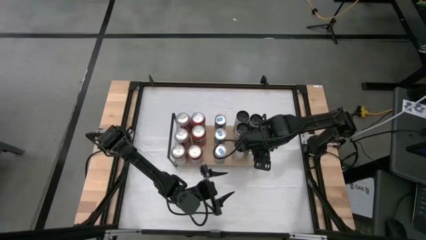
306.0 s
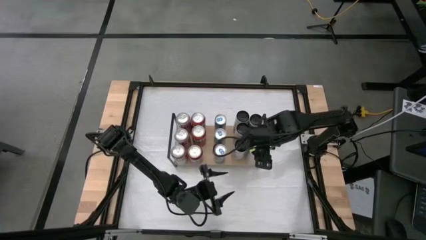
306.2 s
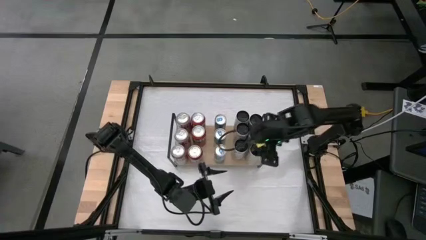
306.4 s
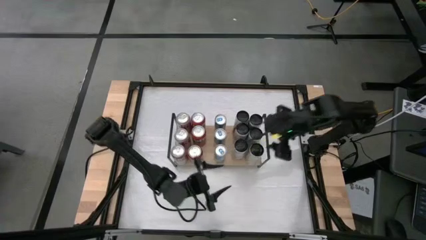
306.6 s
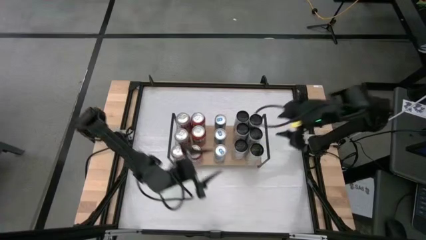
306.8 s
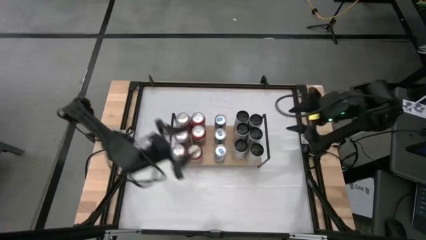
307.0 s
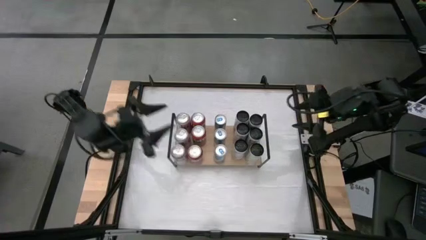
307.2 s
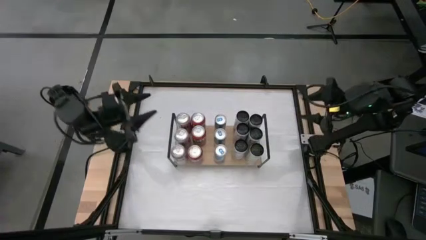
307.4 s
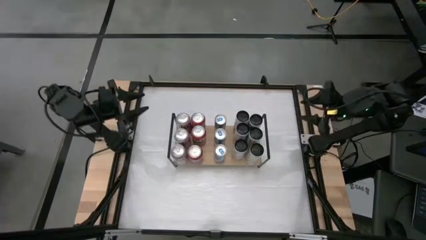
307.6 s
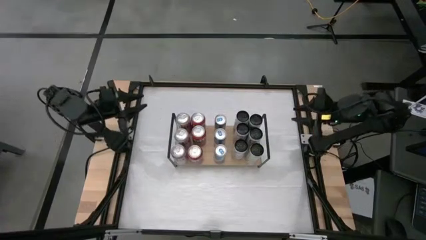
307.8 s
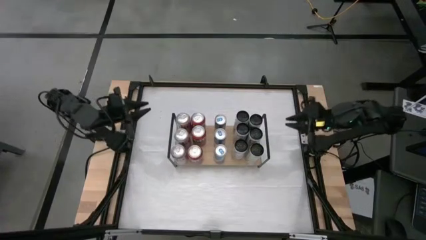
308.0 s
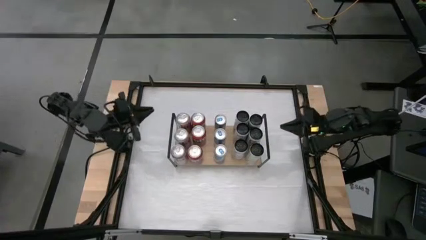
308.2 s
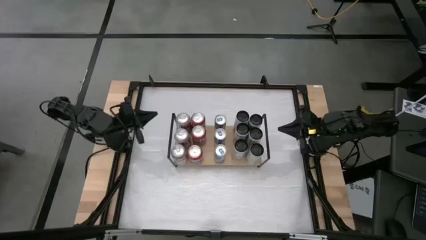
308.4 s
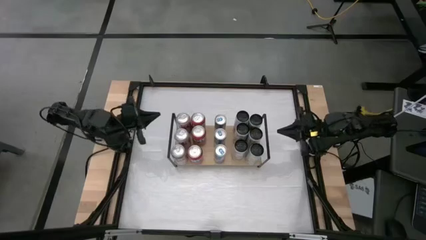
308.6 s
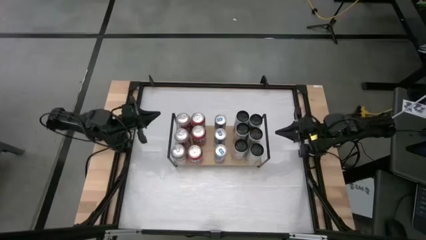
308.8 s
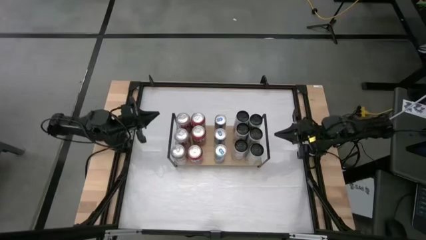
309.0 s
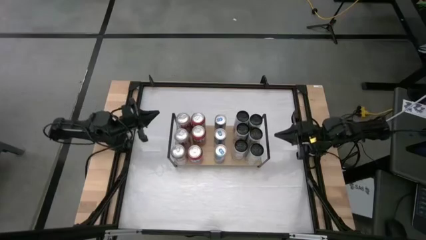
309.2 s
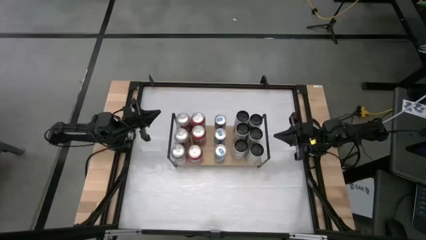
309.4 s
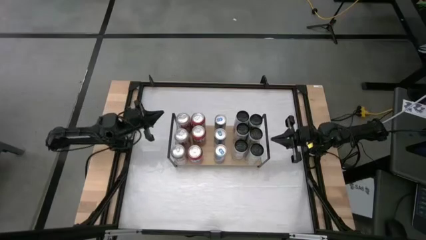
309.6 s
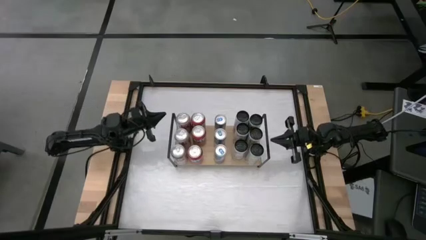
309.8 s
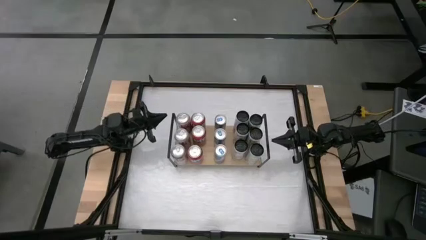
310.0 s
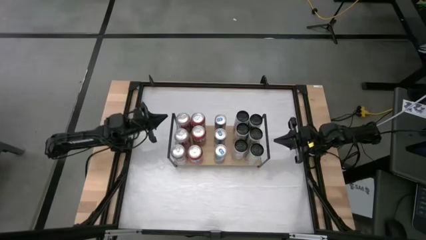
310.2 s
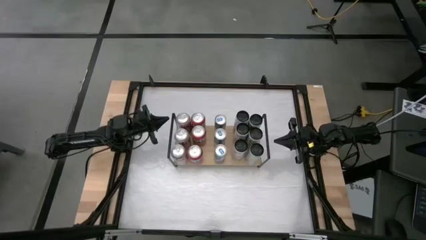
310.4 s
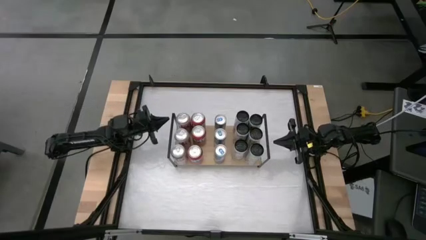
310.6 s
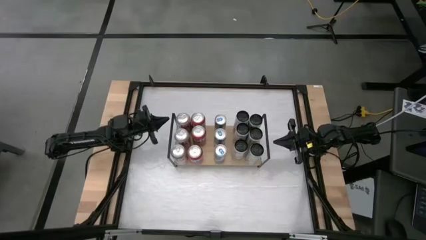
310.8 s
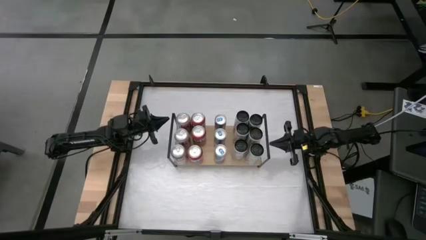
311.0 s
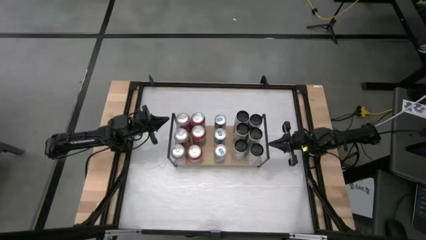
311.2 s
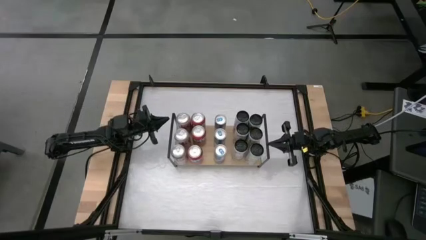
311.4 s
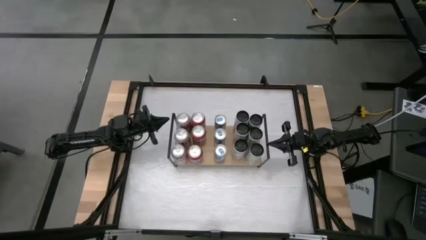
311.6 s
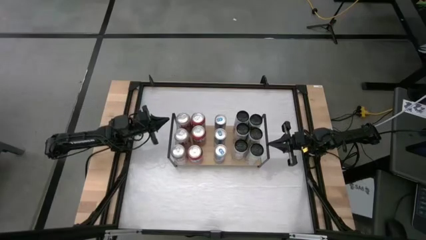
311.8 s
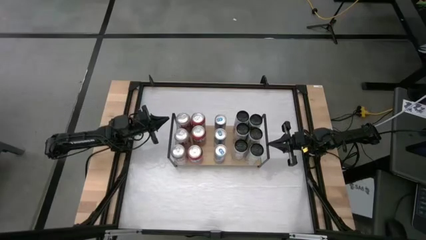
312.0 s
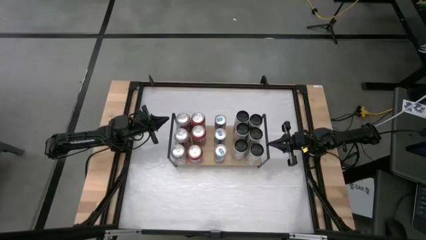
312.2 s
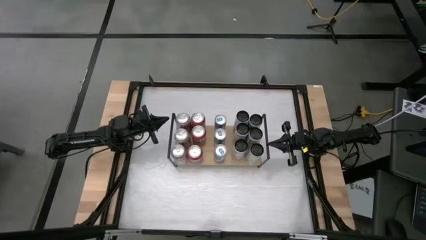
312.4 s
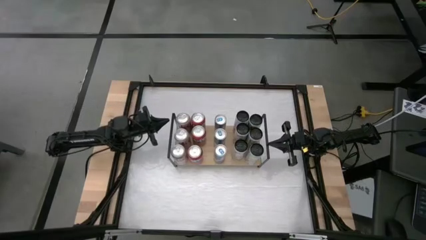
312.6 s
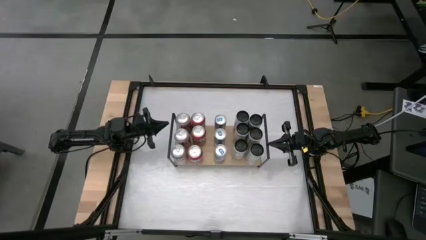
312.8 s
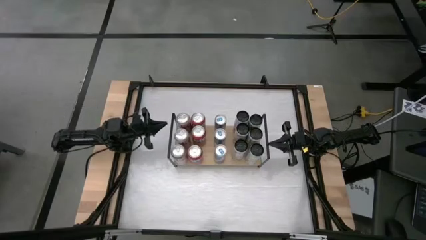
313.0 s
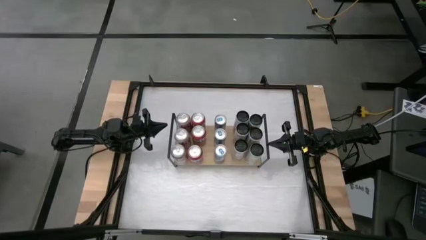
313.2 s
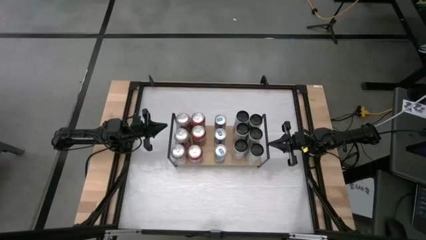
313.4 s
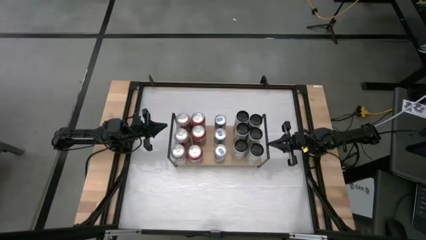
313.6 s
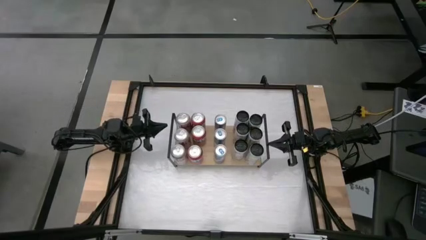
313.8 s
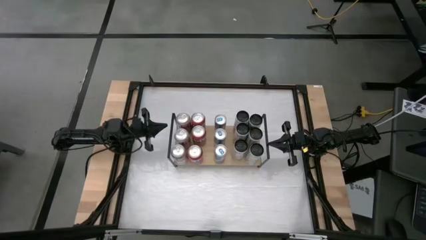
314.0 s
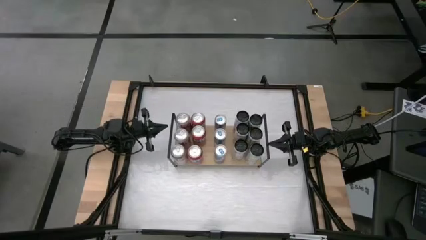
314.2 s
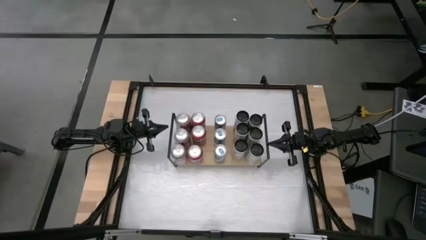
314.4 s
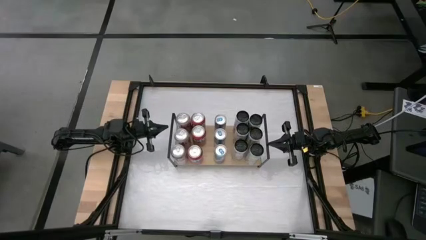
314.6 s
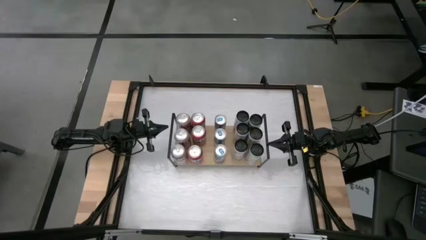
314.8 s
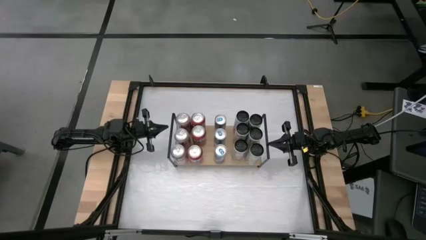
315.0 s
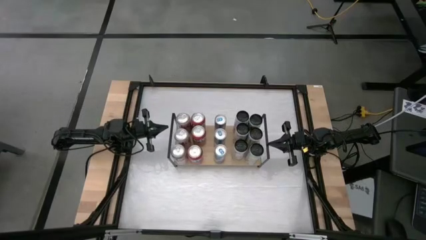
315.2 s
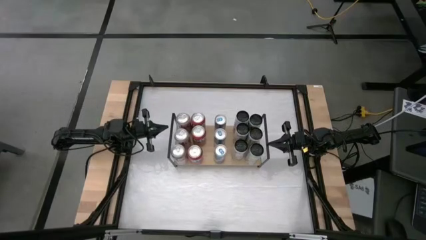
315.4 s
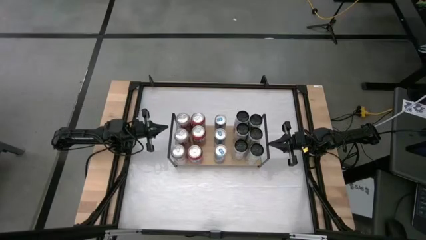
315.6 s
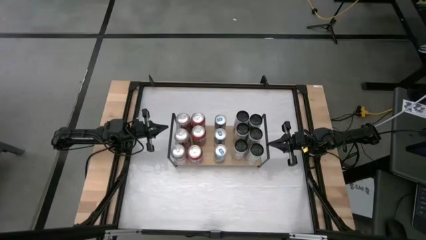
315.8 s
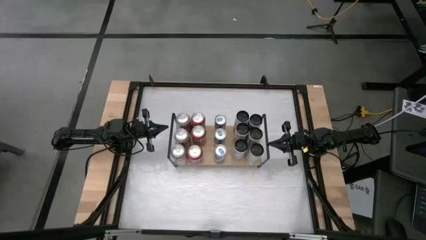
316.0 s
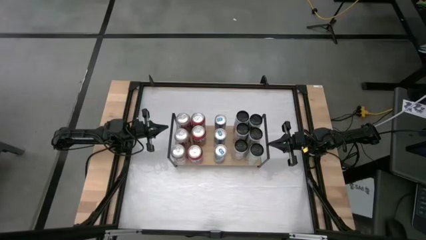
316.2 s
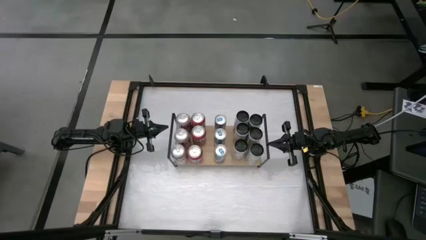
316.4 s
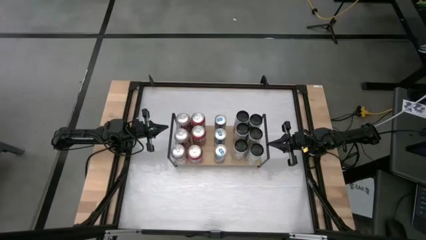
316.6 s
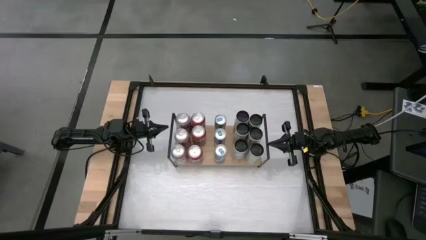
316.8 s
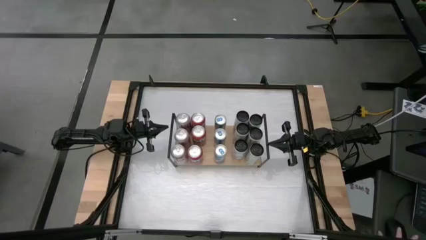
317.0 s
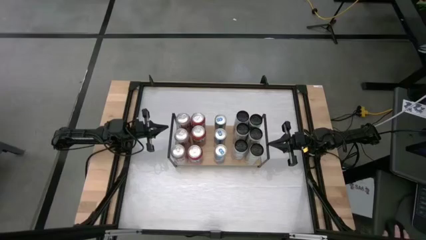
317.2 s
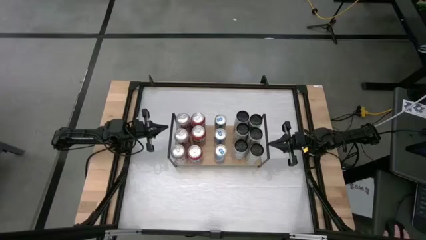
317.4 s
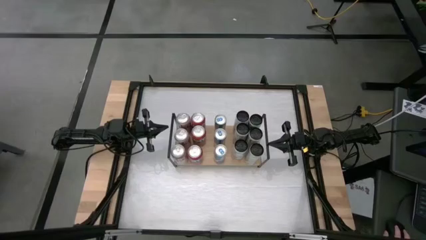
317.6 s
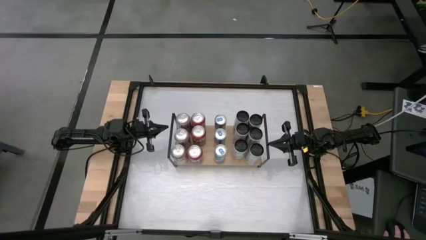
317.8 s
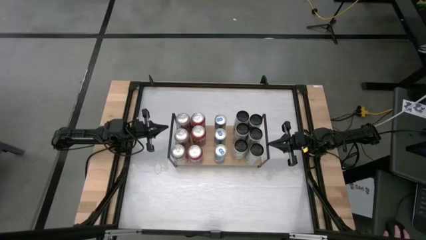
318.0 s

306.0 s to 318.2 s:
Task: Place canned beverage on shelf
Return to Home Position
